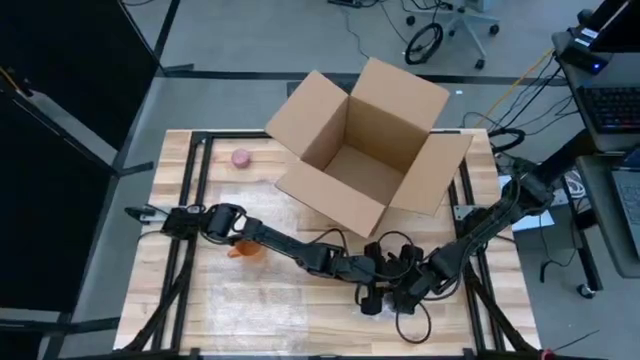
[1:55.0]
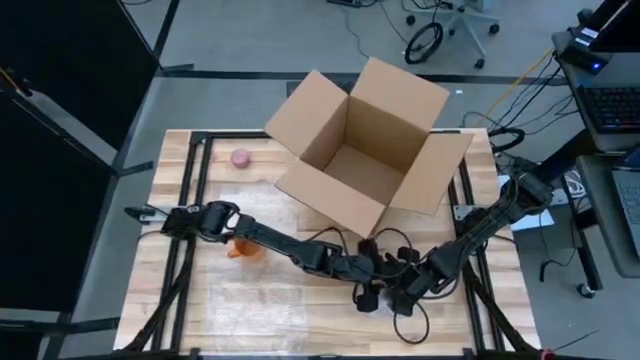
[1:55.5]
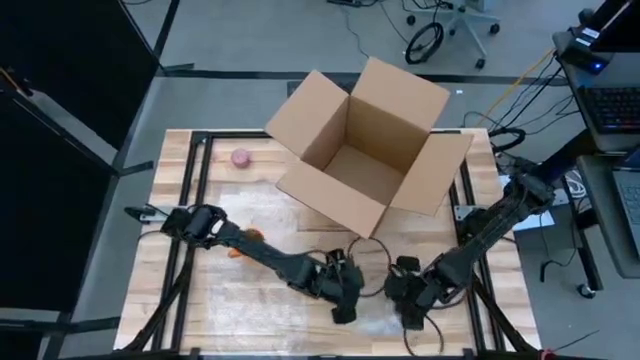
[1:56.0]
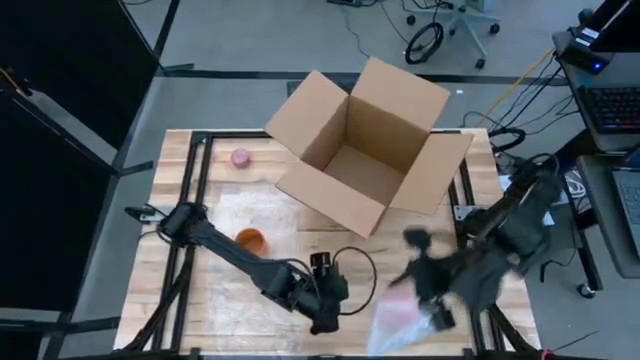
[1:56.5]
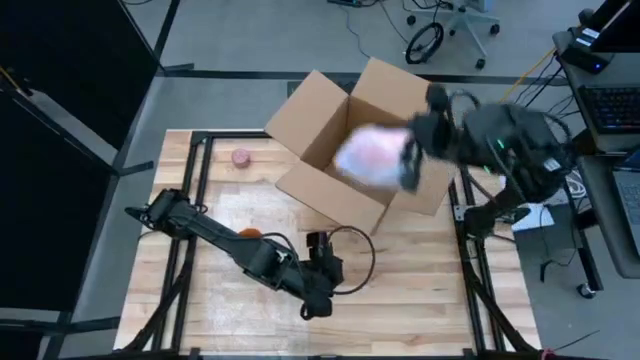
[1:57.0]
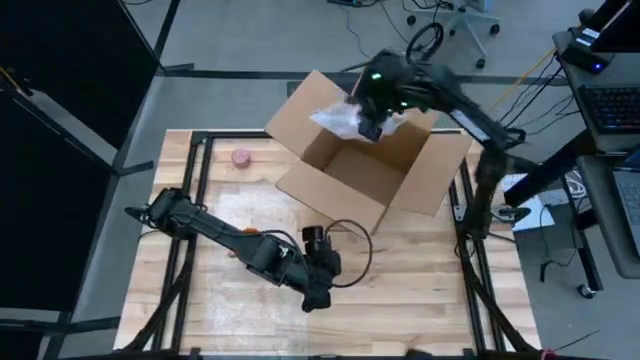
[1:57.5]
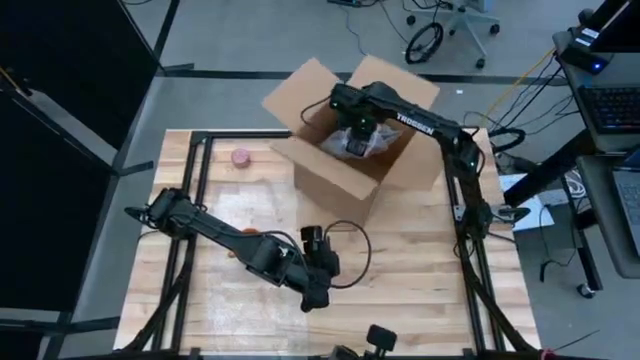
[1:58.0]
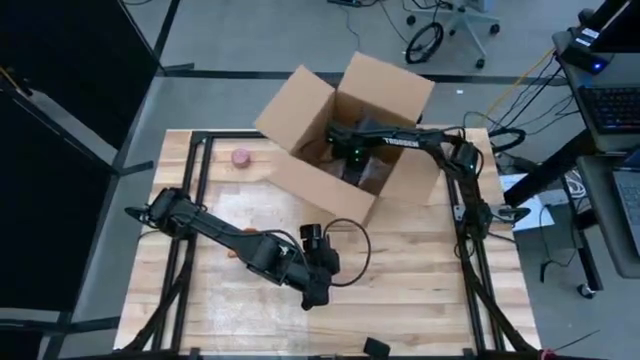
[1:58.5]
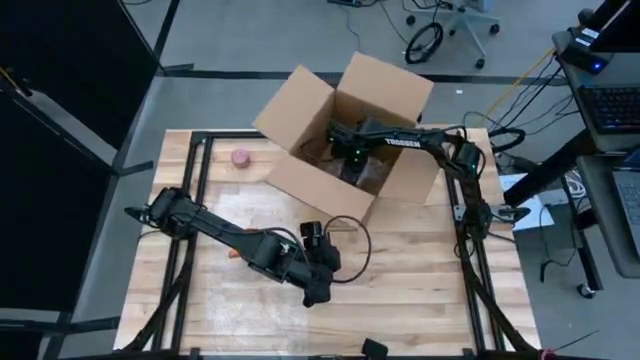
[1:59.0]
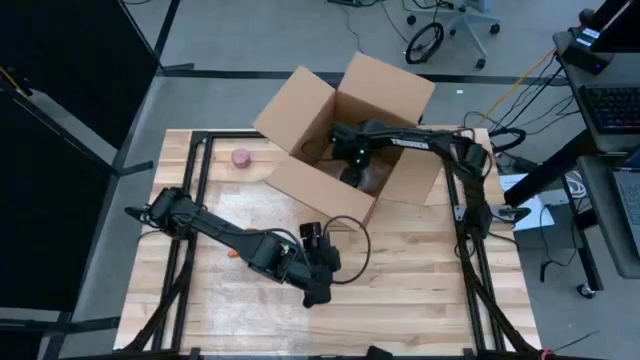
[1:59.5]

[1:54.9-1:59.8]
Task: wrap mug
Put the pink wrapped cup into the box

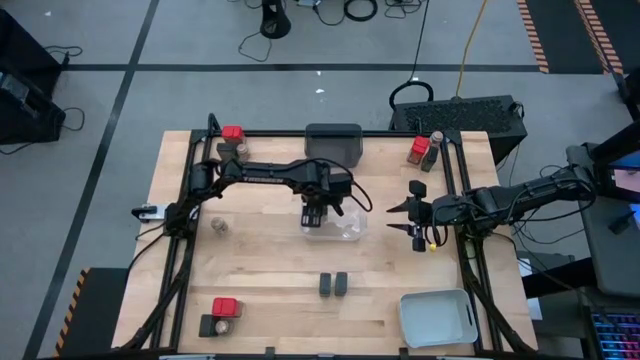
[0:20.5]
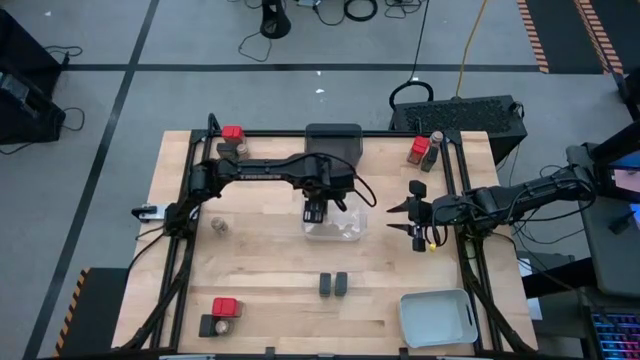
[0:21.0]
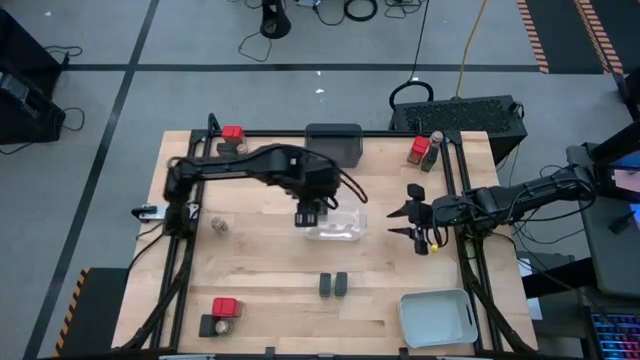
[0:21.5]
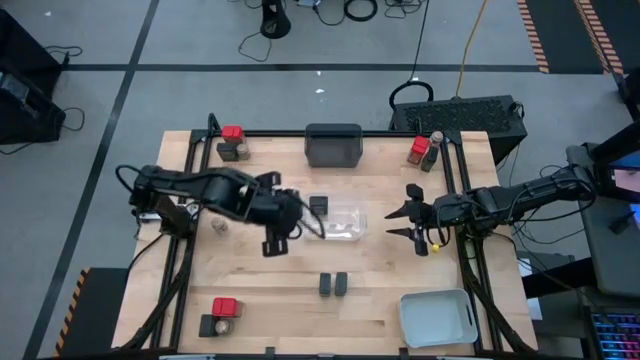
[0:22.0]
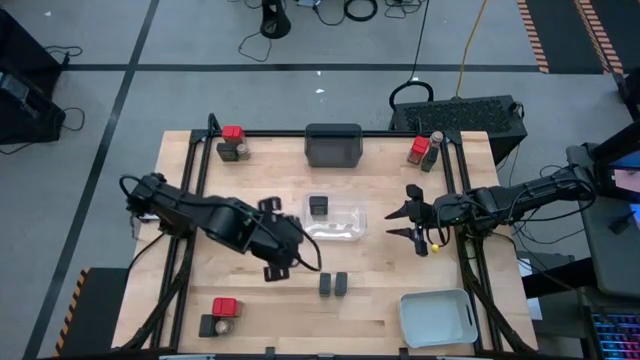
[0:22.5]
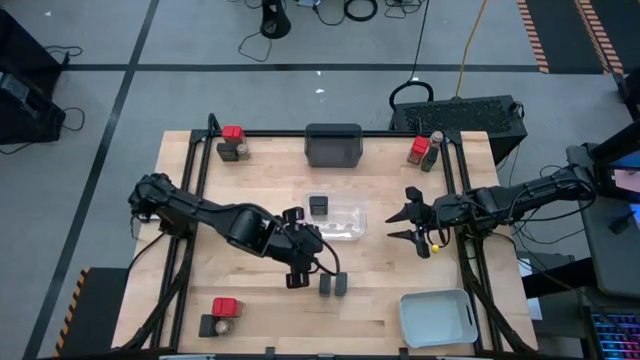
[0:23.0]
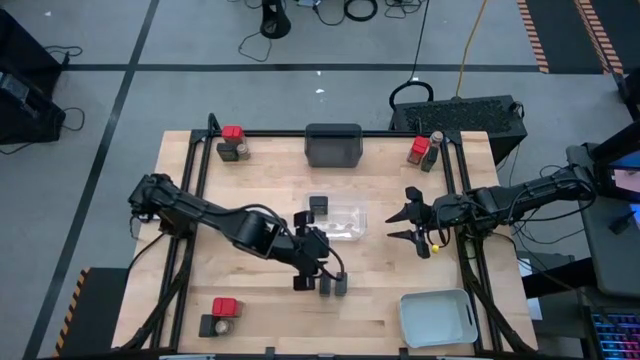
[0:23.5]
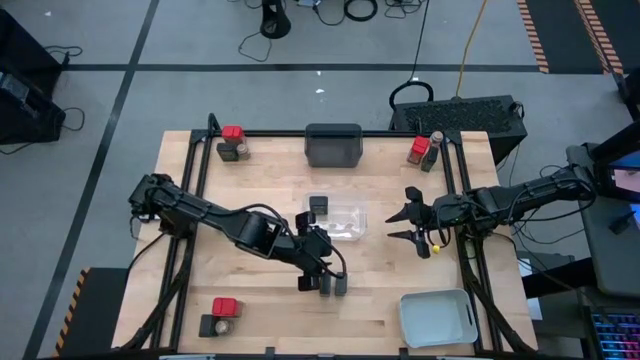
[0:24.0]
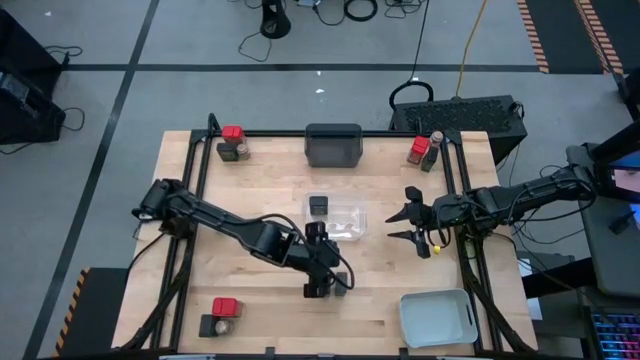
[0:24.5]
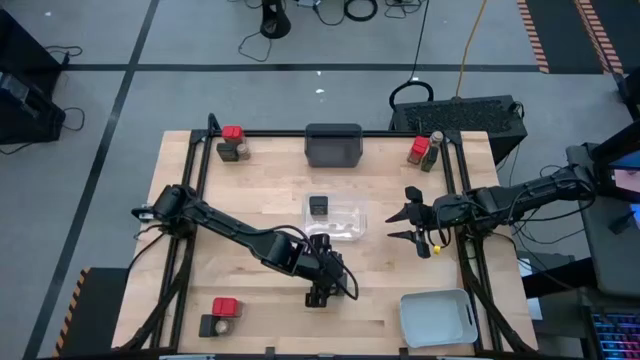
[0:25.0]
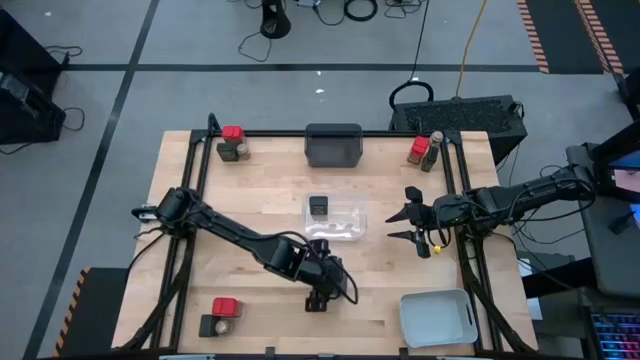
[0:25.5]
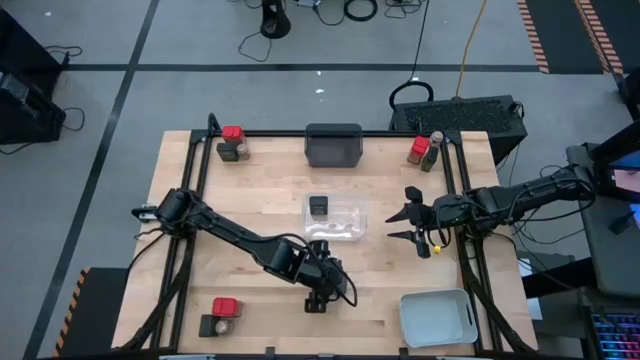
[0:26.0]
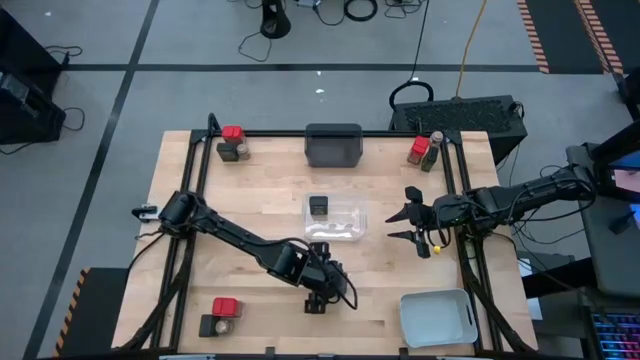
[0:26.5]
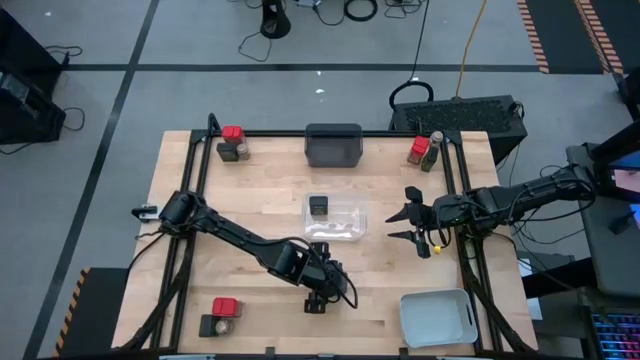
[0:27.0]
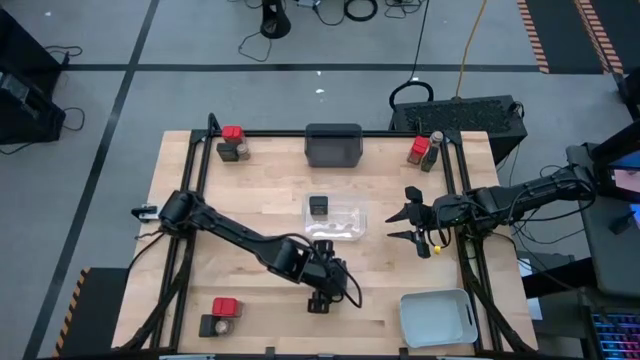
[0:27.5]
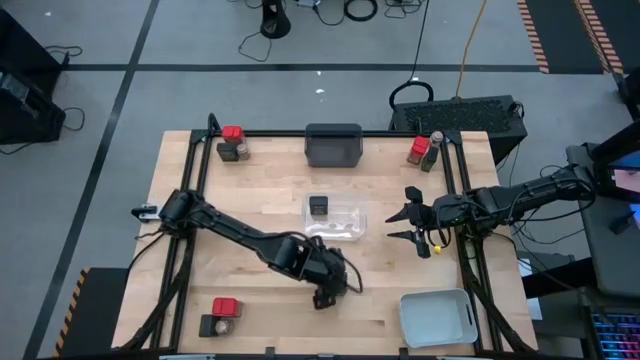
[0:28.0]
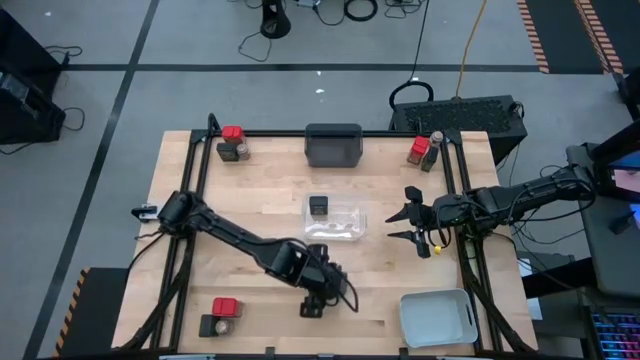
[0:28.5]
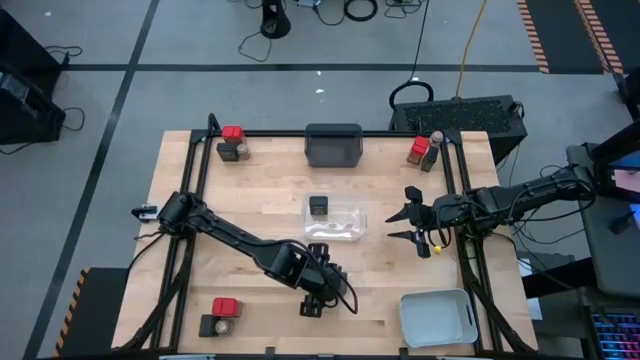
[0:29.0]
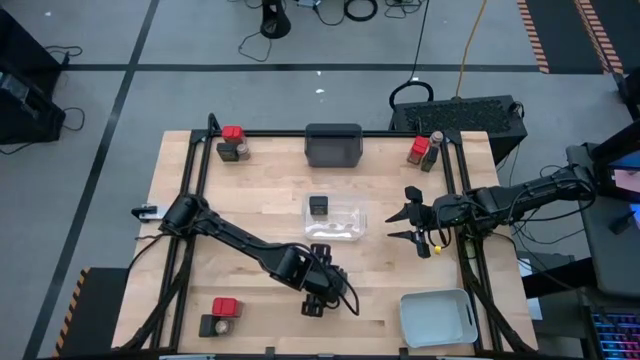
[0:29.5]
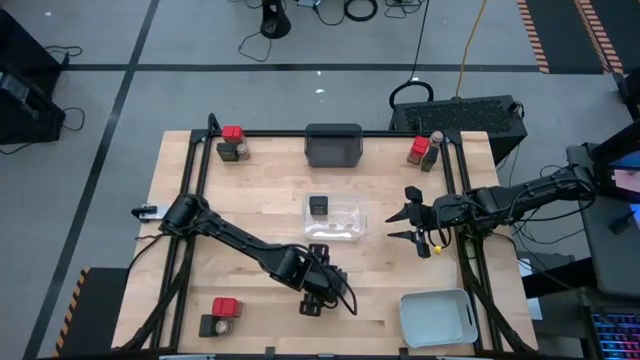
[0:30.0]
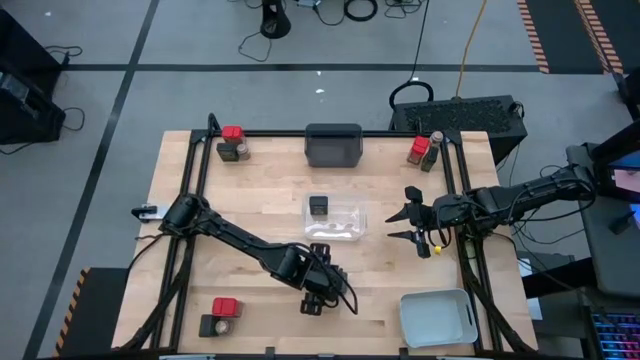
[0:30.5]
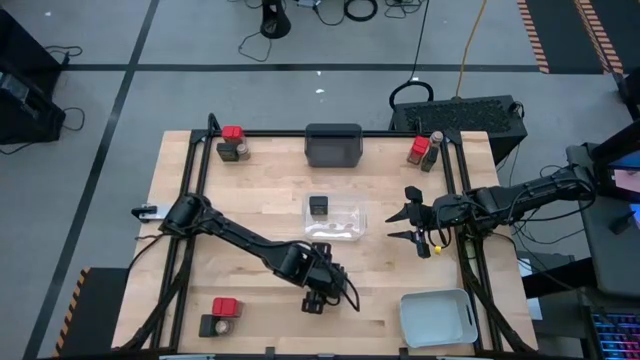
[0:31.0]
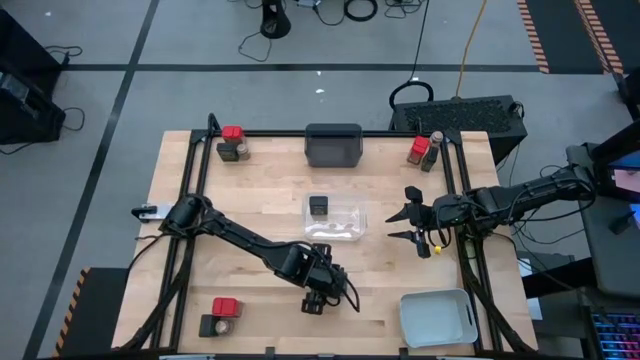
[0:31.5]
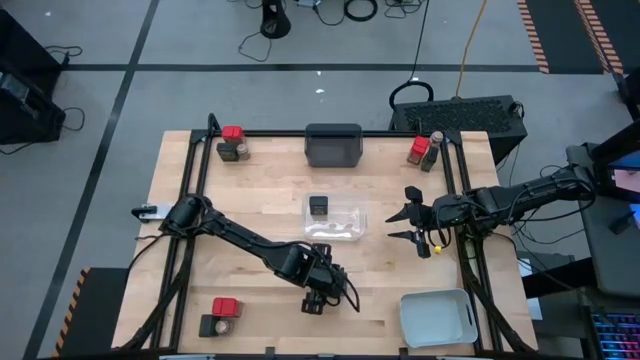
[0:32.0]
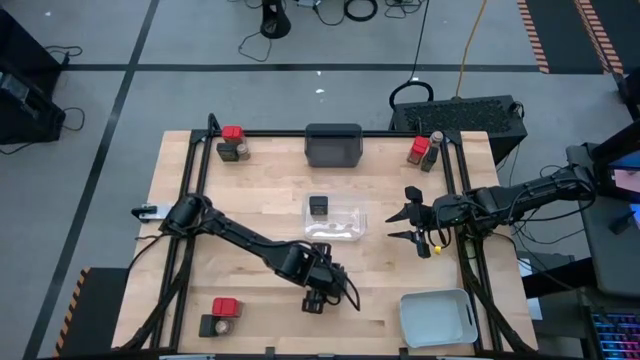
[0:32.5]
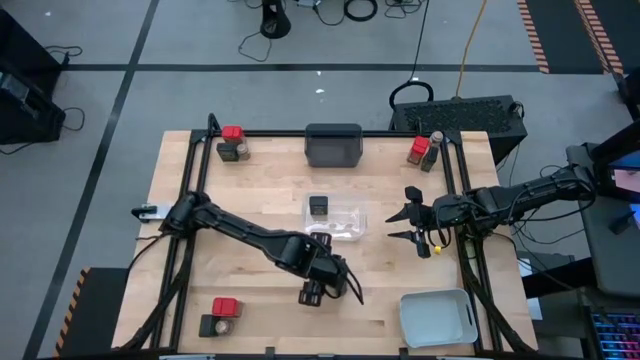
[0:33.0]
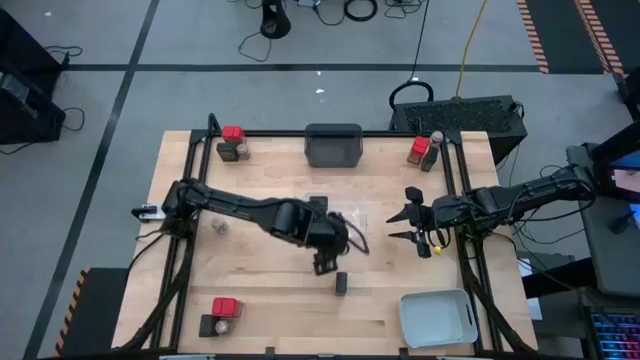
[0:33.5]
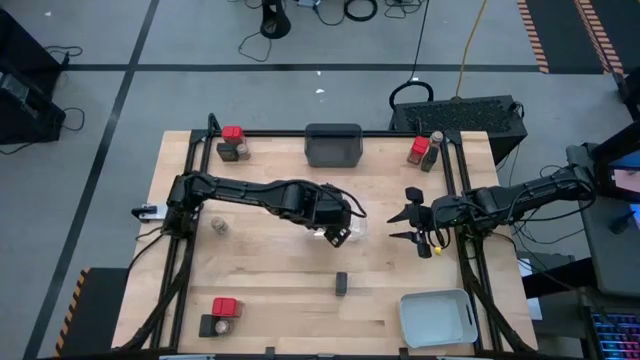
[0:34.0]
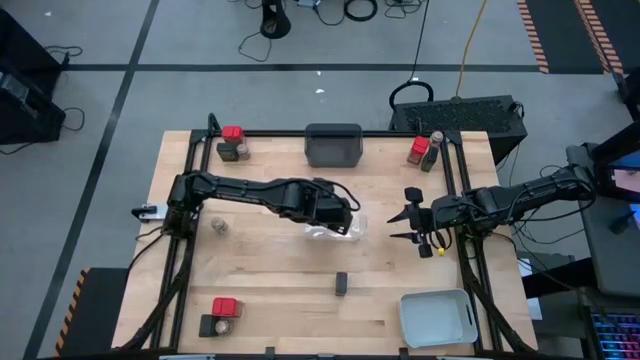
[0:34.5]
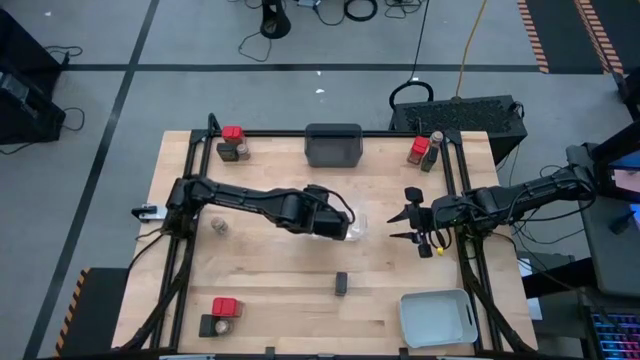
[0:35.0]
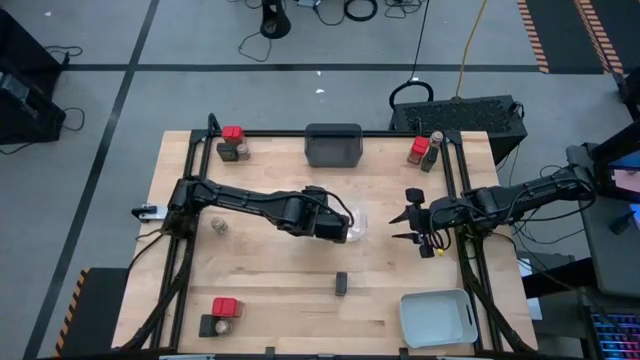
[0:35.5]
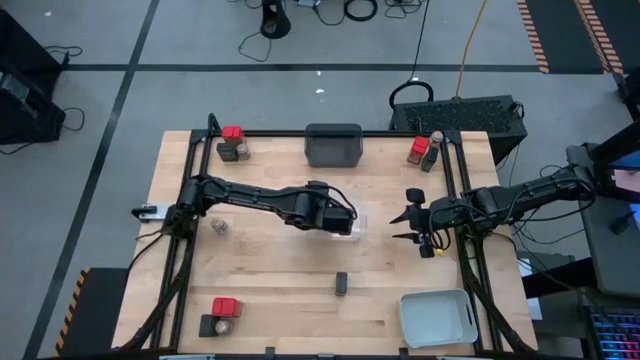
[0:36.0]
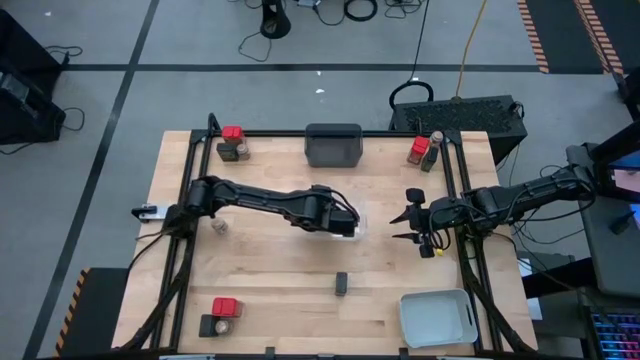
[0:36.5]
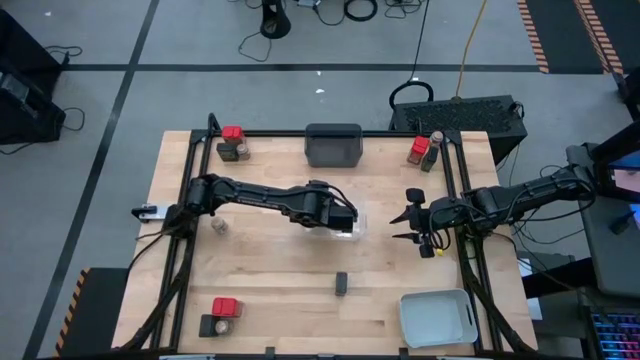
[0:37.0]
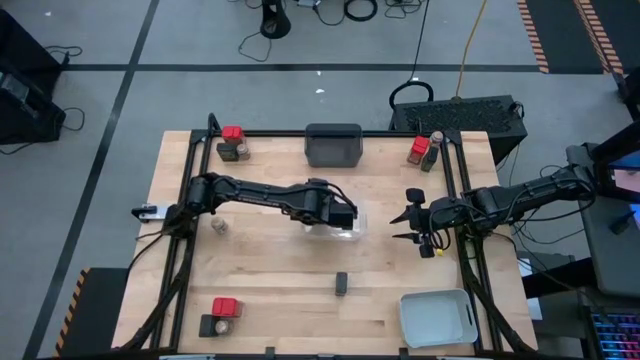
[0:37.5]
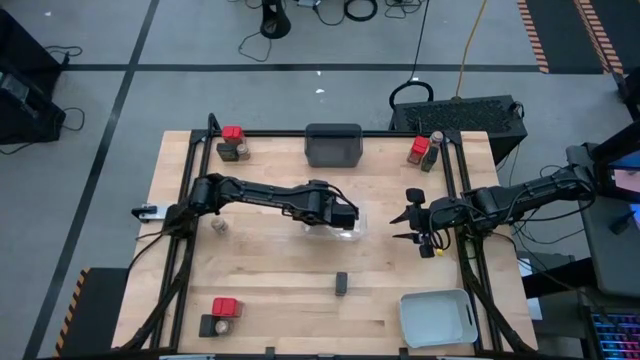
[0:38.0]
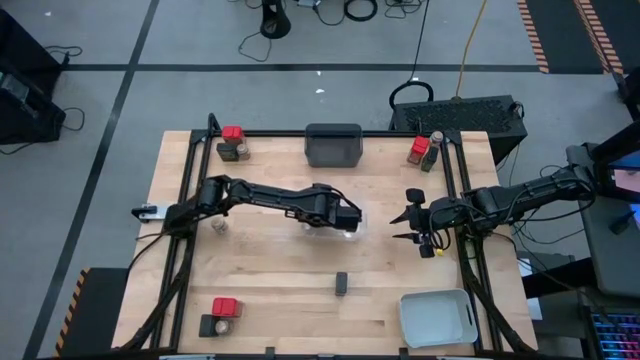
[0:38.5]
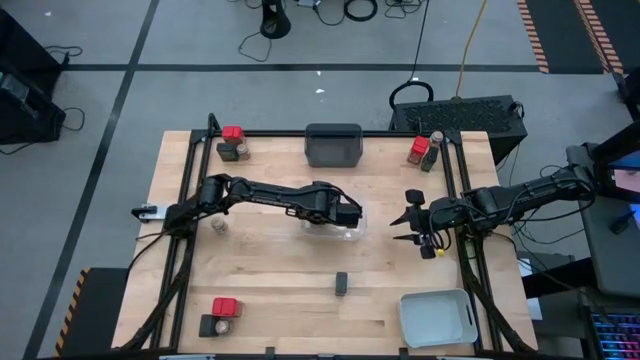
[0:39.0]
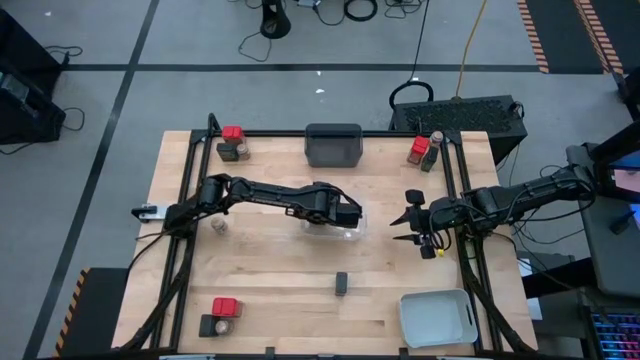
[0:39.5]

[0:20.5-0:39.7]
Task: Sort spices by type
Put the green seasoning bottle into the transparent bin
